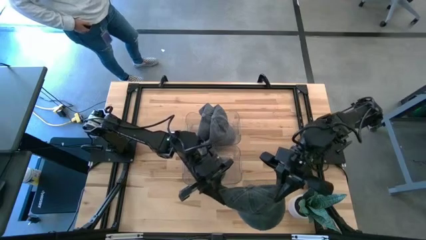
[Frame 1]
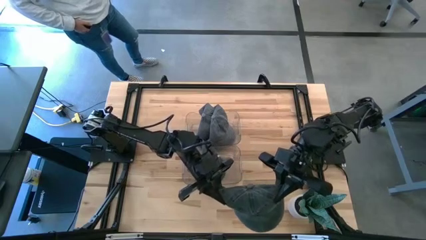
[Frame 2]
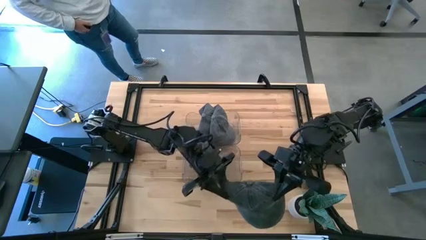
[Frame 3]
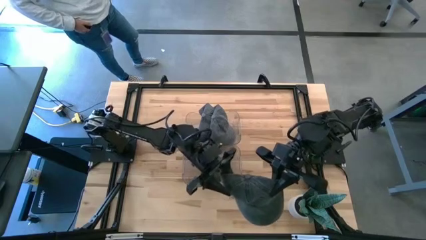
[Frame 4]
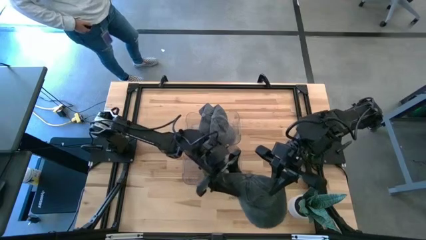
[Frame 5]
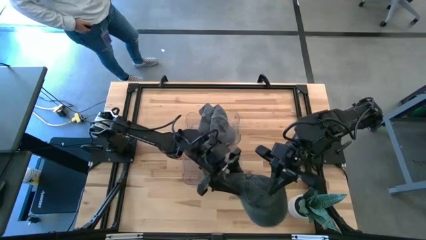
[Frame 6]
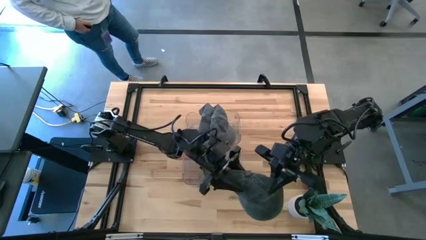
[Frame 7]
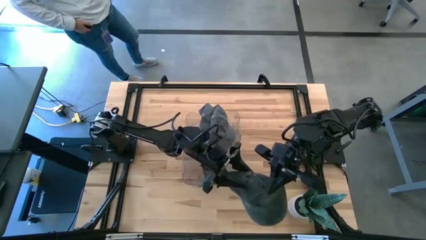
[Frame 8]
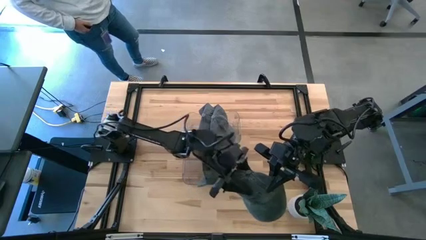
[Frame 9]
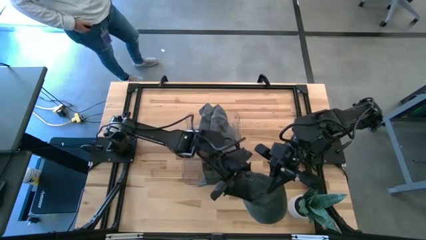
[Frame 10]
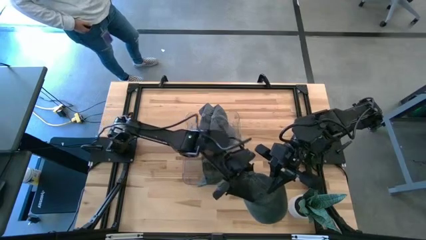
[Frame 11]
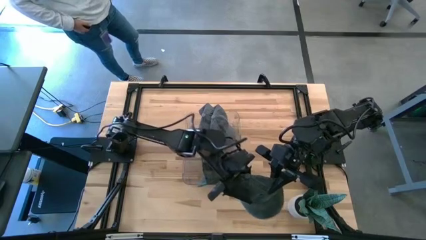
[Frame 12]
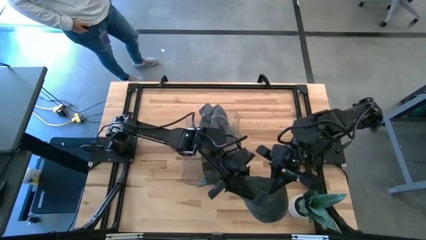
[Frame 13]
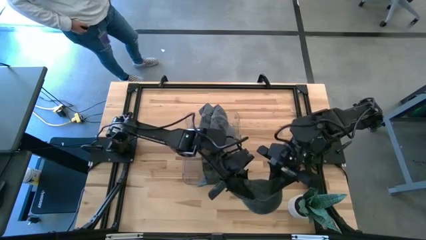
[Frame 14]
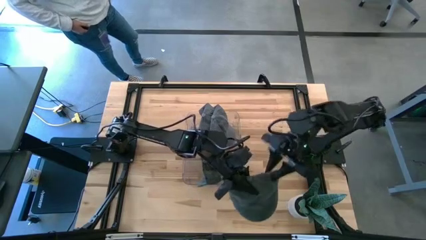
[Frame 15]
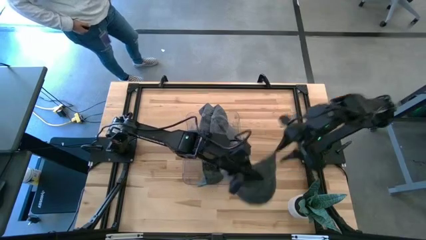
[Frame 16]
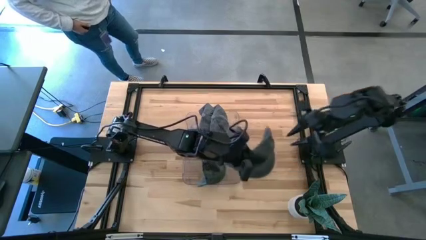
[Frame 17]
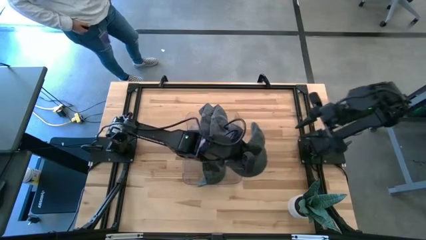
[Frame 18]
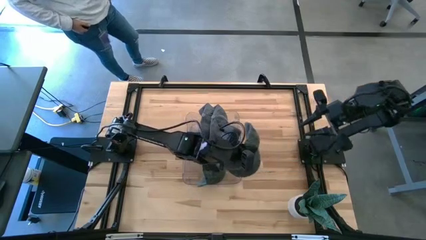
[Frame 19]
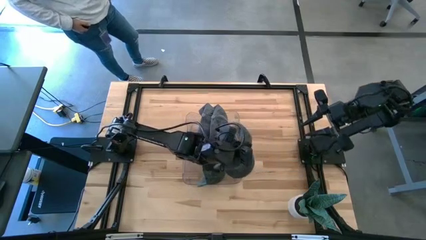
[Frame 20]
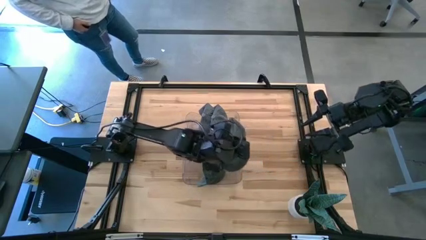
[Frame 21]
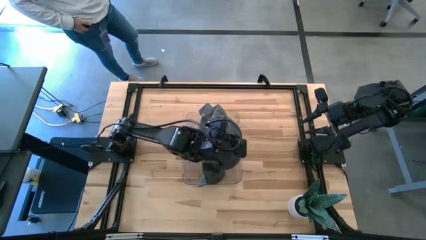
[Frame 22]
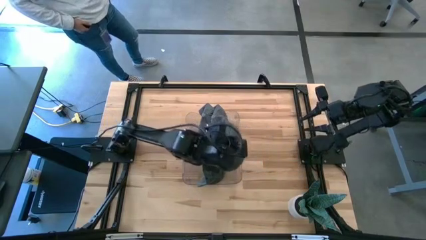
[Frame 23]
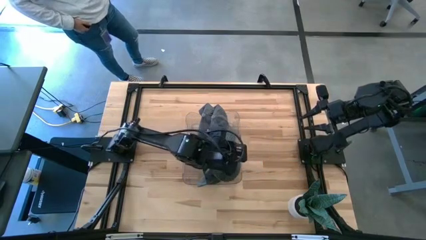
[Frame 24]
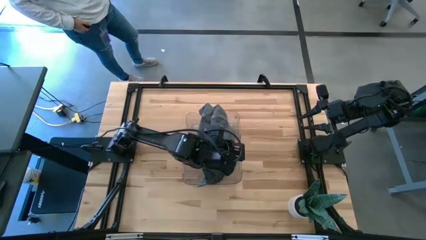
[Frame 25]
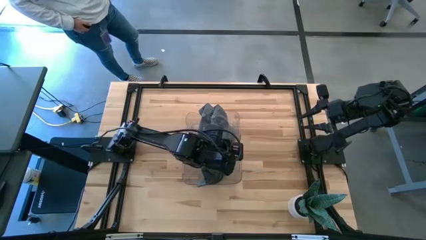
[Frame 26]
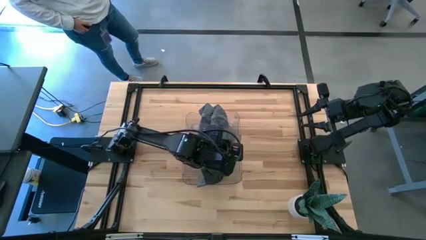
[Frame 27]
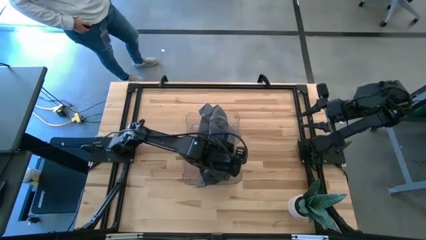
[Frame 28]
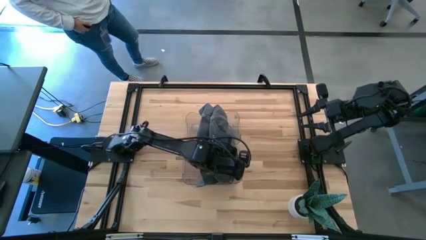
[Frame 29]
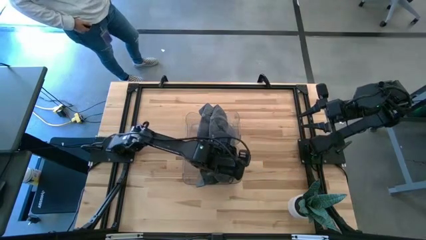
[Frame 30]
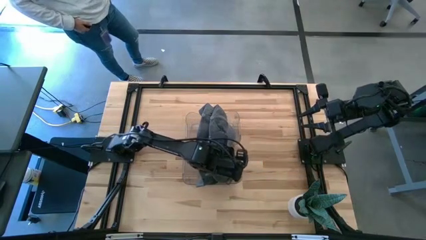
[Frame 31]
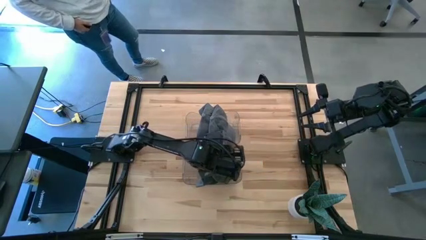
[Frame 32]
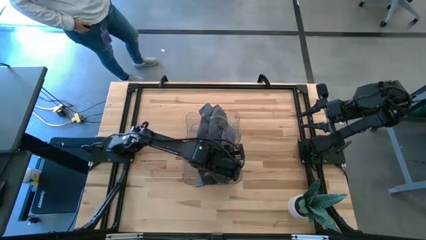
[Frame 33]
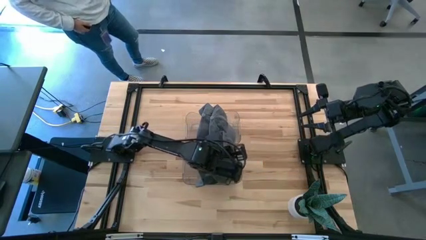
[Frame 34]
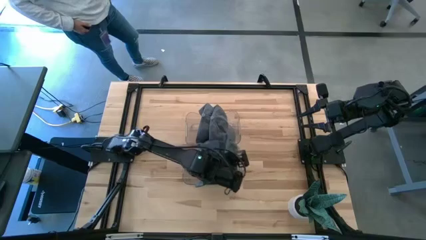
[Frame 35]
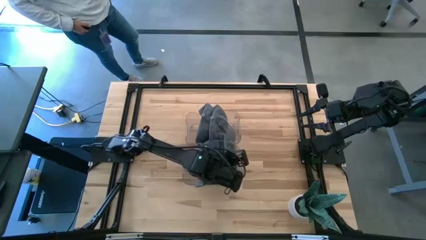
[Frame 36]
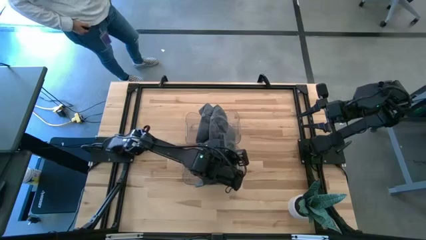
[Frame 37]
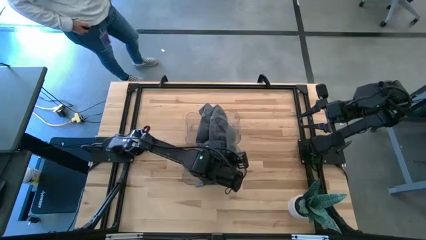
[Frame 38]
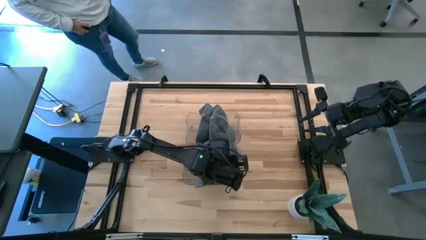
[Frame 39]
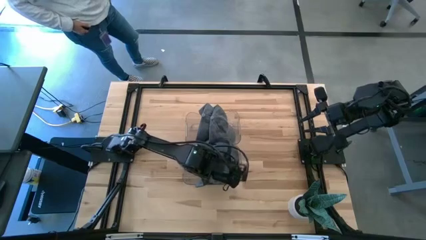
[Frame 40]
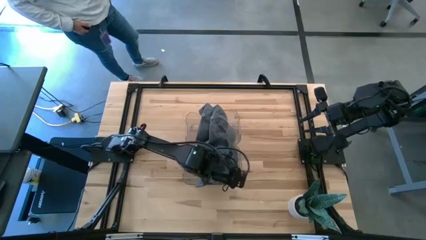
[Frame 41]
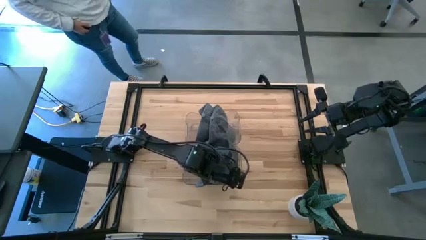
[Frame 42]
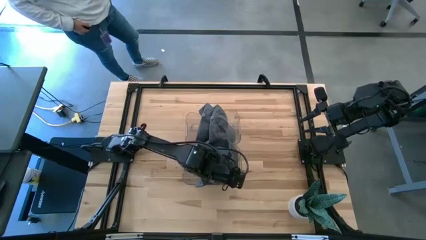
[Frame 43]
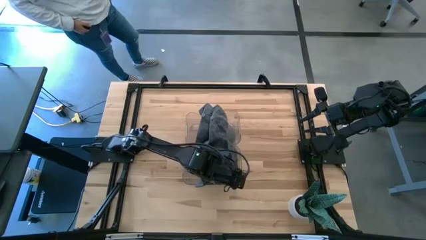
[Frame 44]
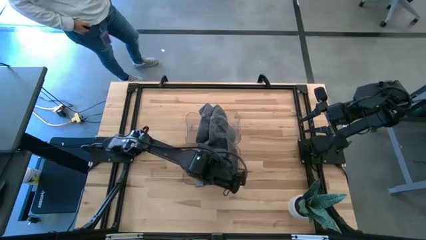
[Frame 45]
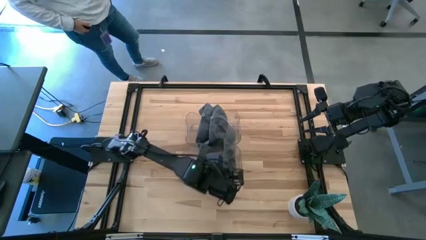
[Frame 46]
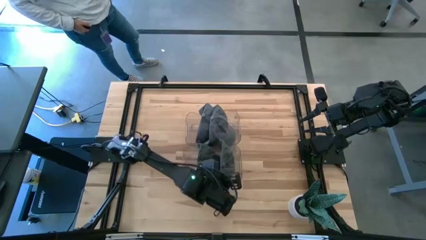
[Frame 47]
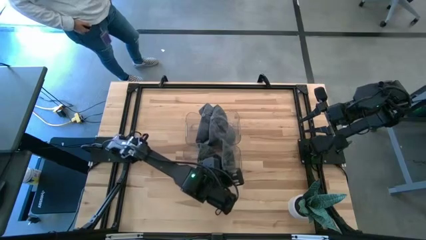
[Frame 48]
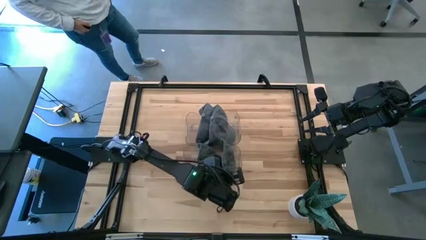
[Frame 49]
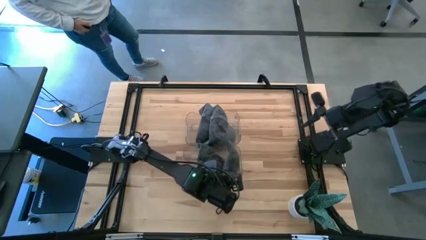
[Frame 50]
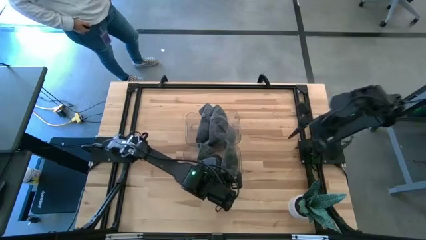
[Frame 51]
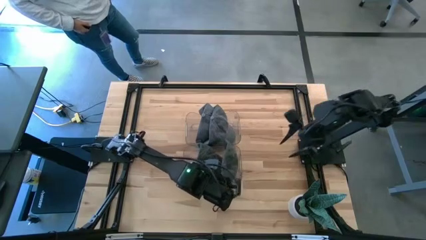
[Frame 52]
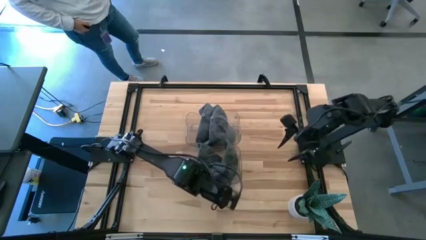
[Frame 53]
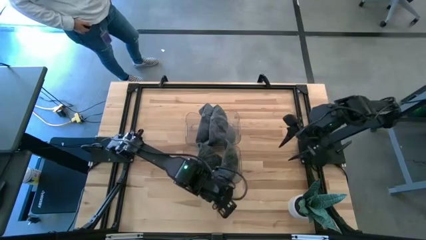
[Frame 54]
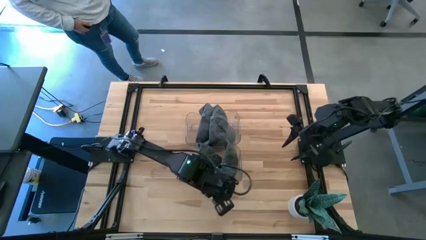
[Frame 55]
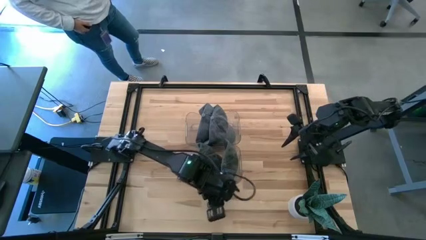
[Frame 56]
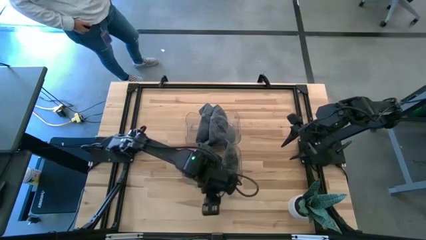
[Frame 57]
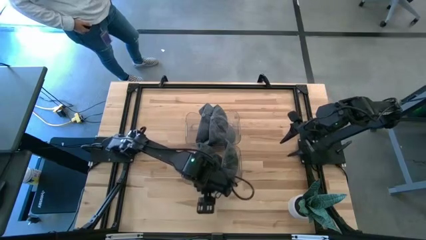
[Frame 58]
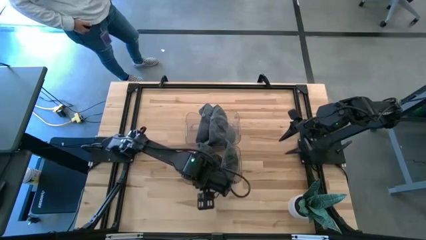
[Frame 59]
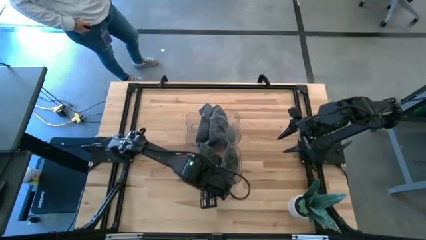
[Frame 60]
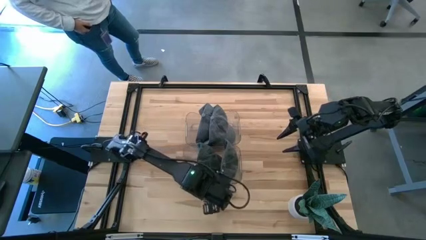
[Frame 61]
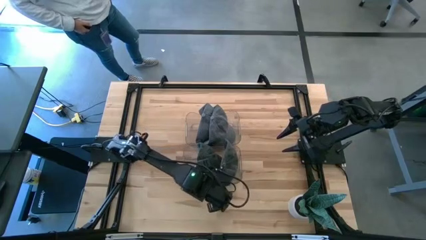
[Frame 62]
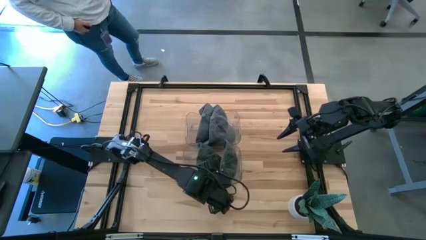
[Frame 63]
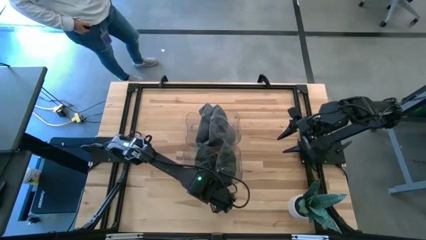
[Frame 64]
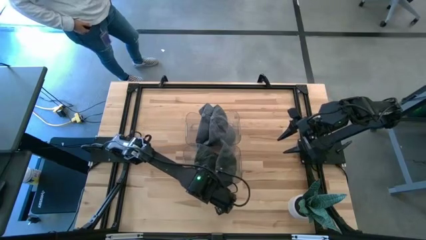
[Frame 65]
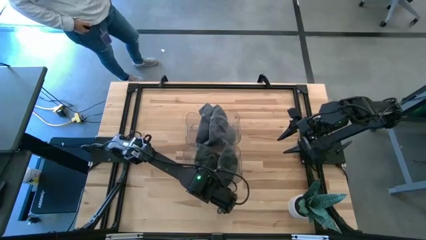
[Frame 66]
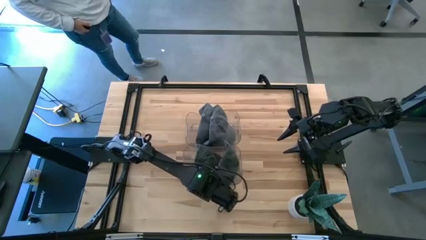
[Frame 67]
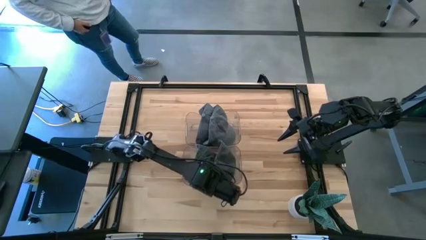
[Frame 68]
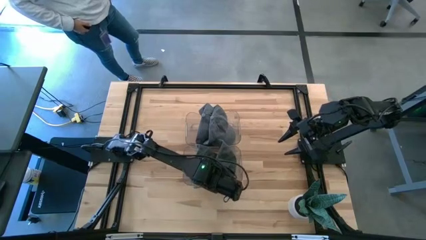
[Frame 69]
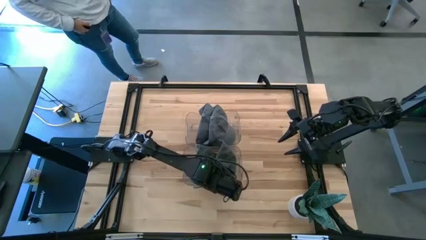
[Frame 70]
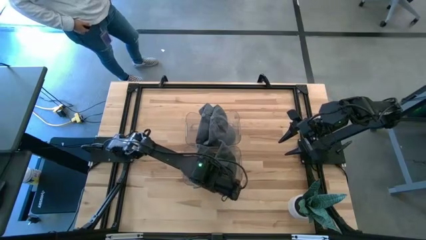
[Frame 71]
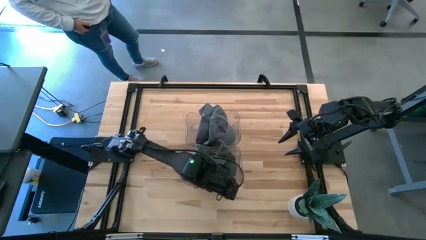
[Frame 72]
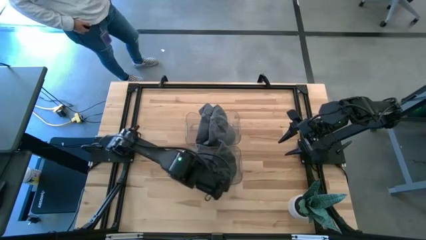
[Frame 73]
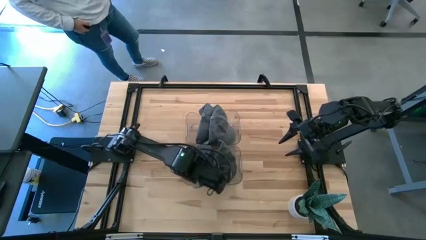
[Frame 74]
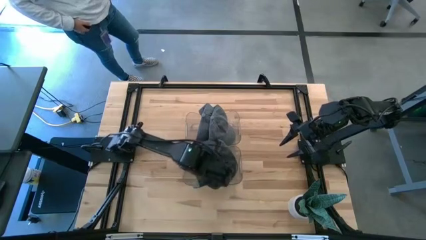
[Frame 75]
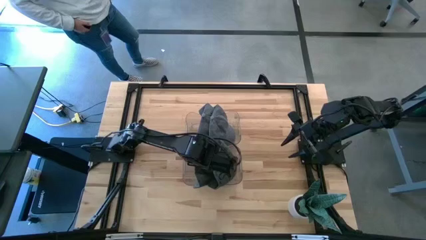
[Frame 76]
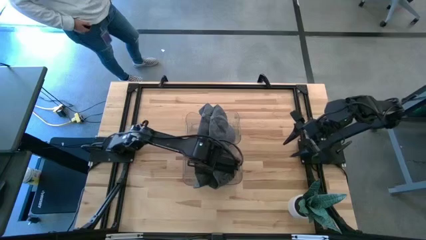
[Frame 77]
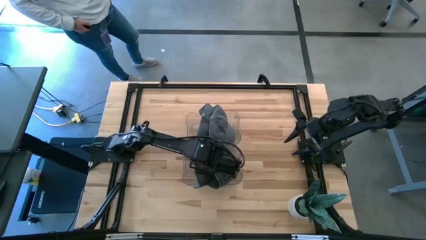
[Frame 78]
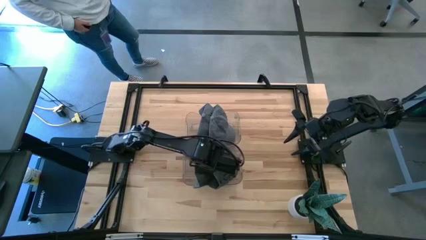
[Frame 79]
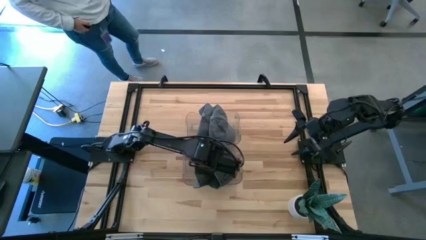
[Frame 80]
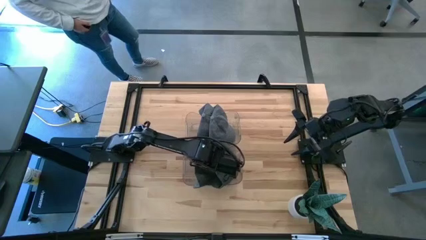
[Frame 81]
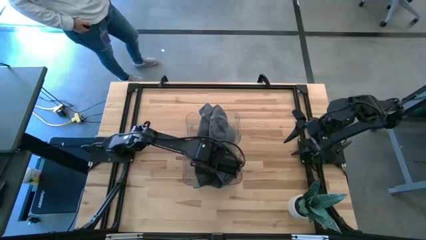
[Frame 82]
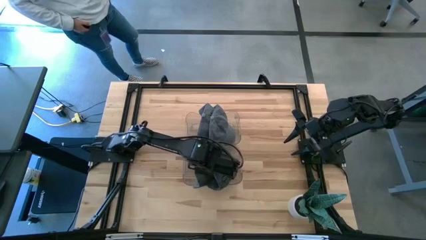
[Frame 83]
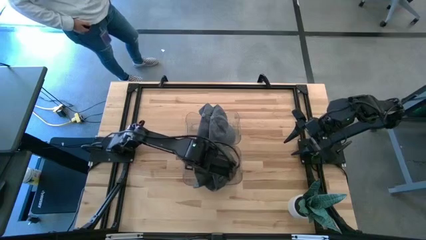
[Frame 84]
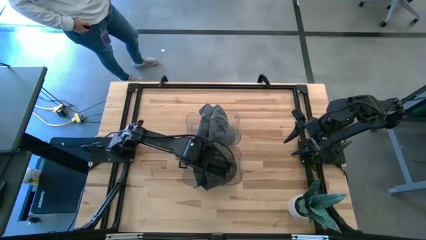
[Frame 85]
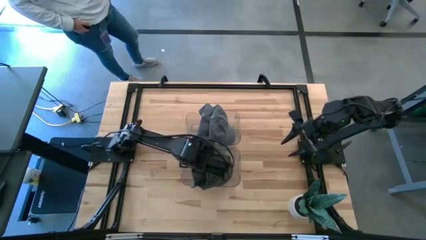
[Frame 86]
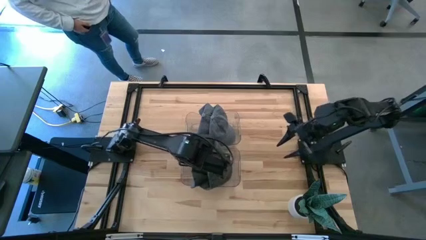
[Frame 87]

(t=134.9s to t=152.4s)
Task: Pick & Place hat
Put the black cap into the bottom transparent bin
